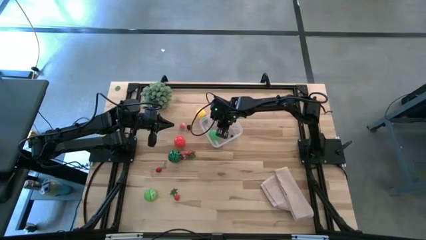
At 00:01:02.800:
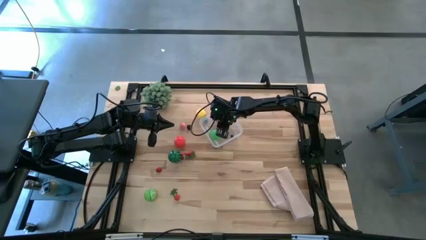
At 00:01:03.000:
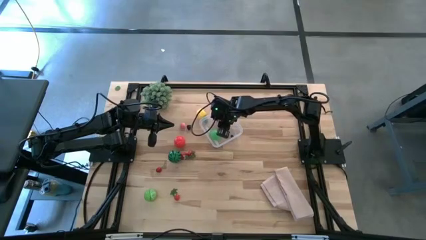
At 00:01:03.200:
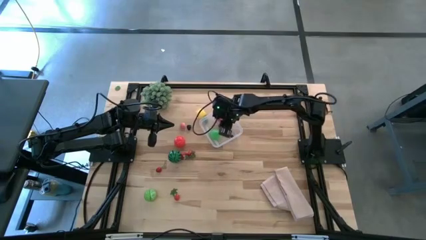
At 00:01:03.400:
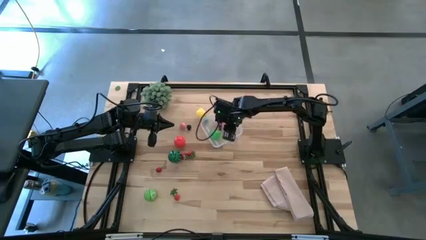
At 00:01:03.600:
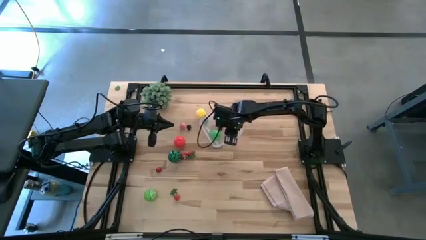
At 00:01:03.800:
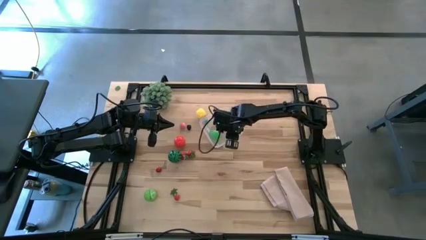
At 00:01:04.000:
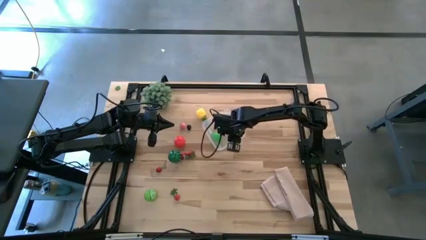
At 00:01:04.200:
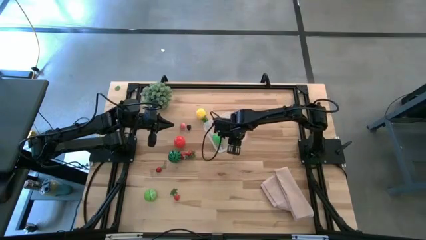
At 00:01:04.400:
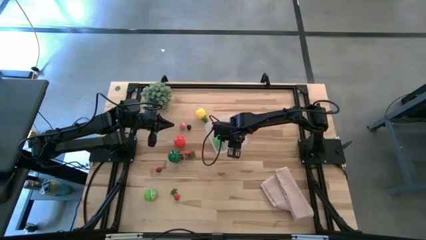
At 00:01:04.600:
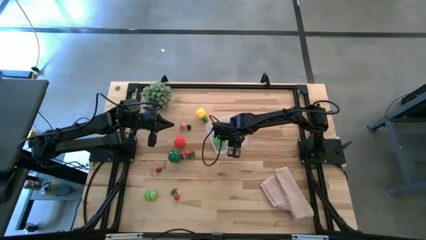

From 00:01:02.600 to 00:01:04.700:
Task: Pick and placing Produce into tupperware
Adjust the transparent bin

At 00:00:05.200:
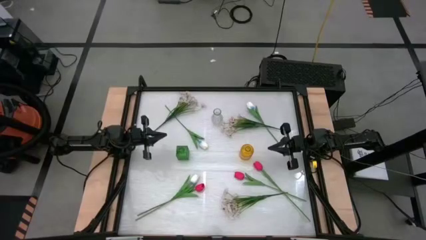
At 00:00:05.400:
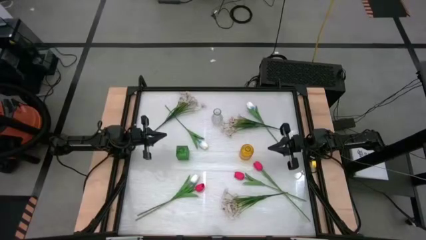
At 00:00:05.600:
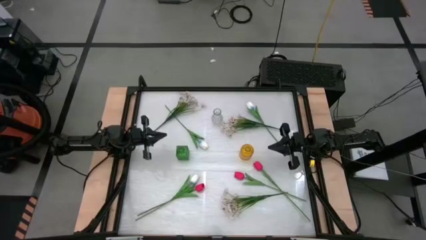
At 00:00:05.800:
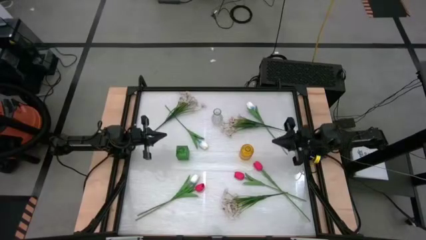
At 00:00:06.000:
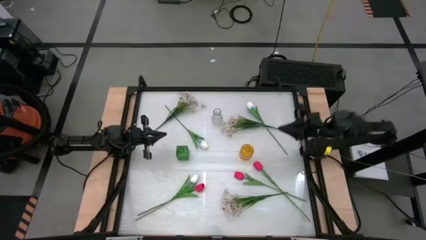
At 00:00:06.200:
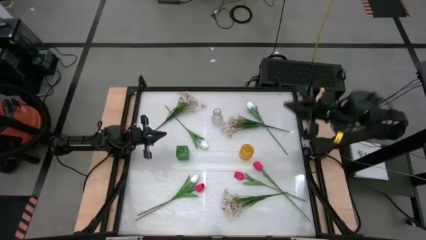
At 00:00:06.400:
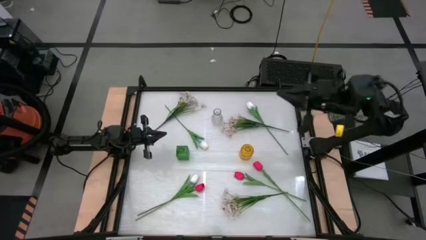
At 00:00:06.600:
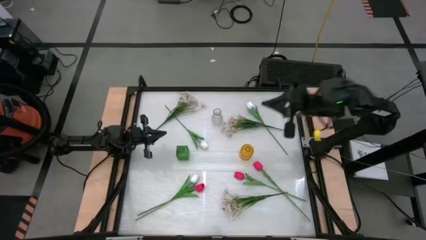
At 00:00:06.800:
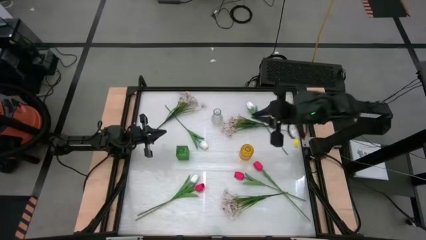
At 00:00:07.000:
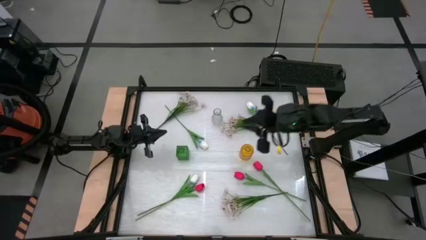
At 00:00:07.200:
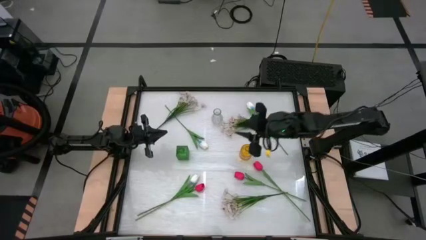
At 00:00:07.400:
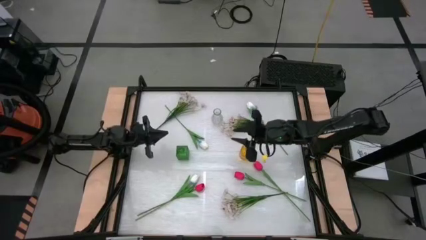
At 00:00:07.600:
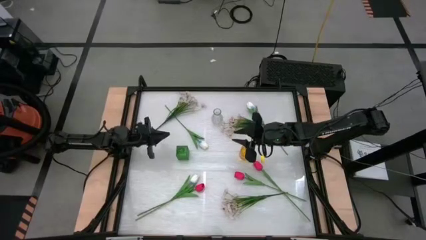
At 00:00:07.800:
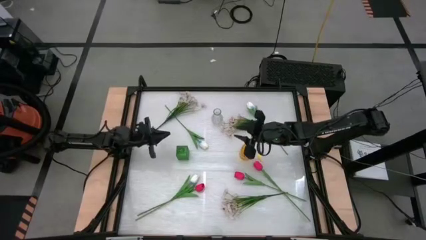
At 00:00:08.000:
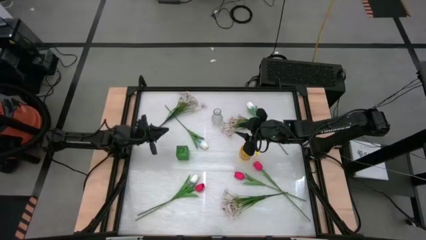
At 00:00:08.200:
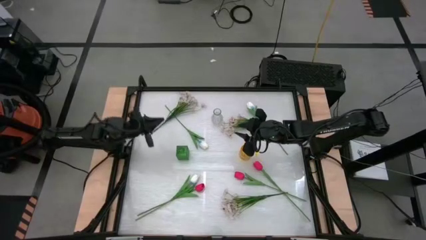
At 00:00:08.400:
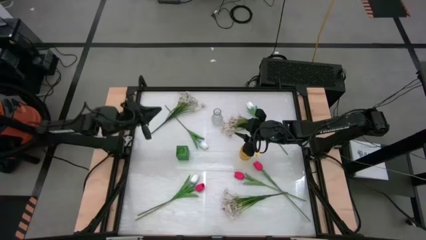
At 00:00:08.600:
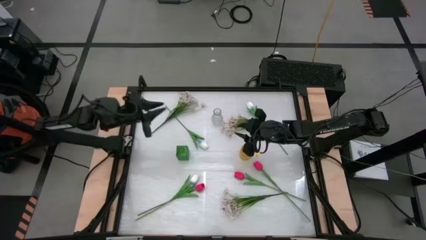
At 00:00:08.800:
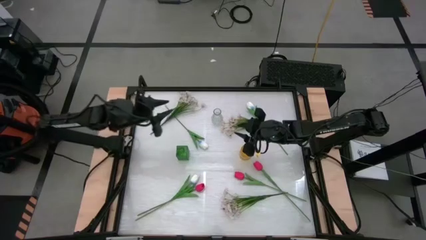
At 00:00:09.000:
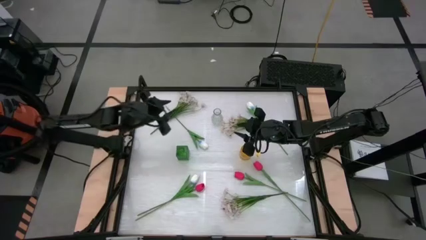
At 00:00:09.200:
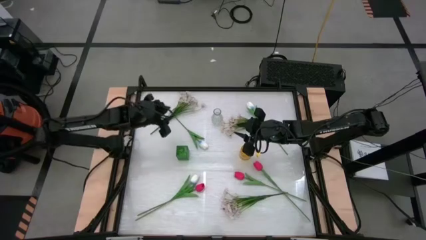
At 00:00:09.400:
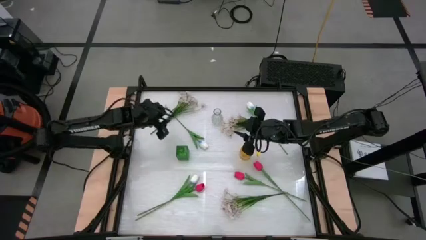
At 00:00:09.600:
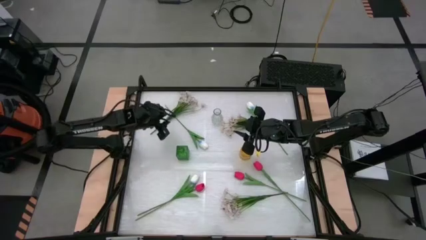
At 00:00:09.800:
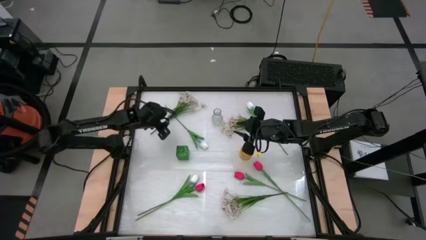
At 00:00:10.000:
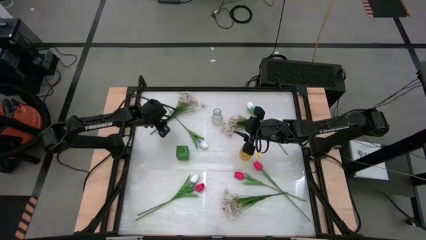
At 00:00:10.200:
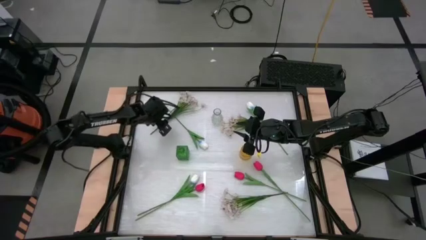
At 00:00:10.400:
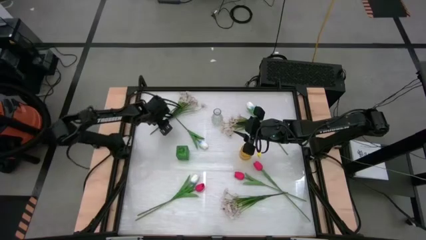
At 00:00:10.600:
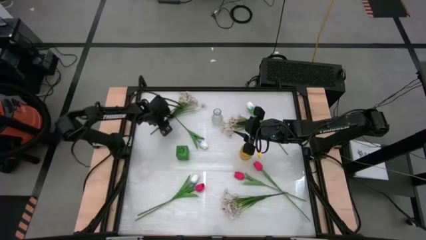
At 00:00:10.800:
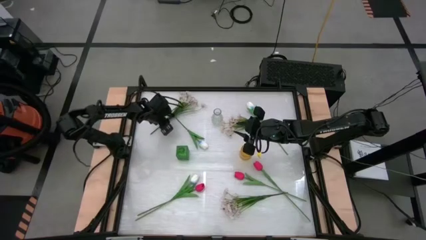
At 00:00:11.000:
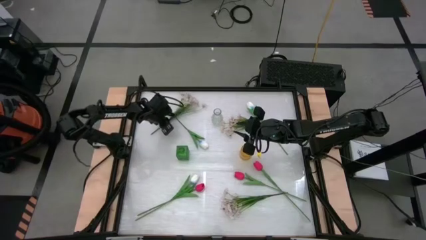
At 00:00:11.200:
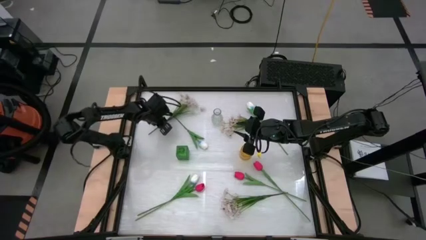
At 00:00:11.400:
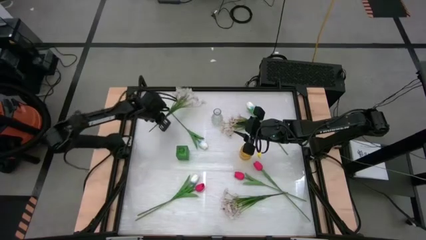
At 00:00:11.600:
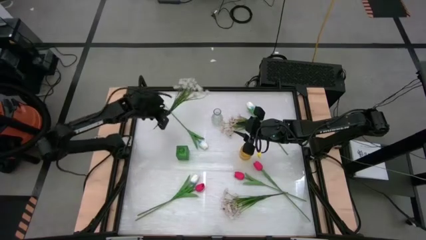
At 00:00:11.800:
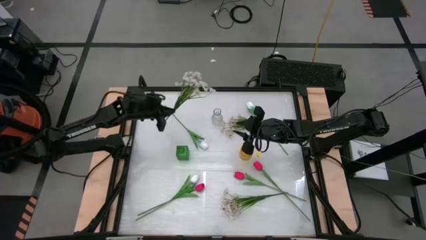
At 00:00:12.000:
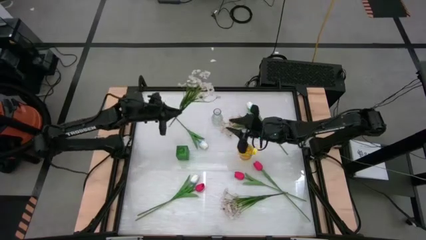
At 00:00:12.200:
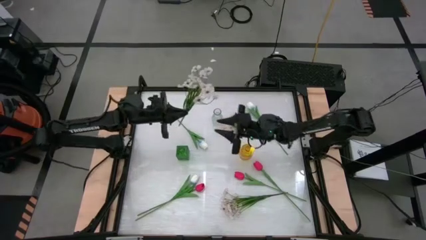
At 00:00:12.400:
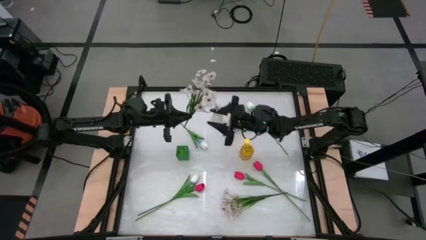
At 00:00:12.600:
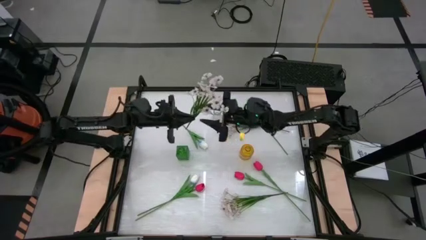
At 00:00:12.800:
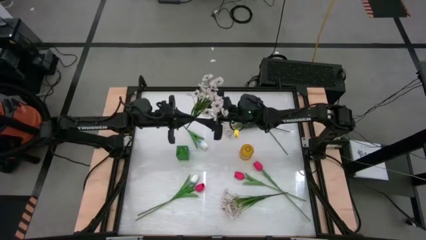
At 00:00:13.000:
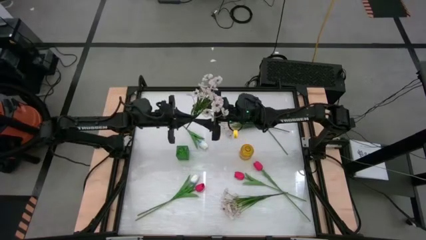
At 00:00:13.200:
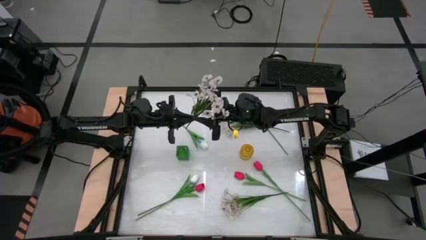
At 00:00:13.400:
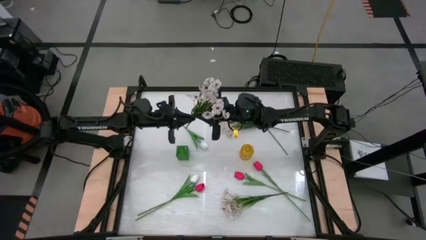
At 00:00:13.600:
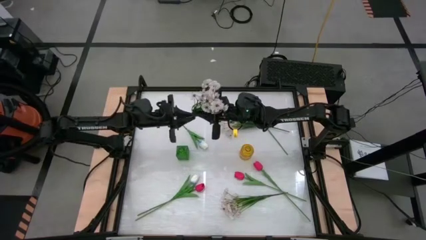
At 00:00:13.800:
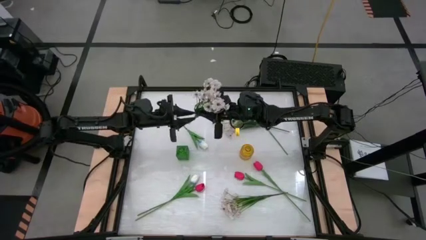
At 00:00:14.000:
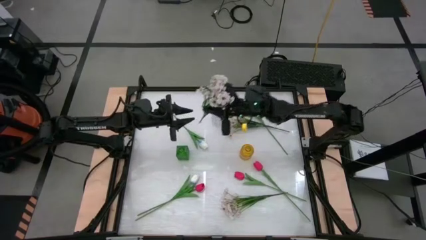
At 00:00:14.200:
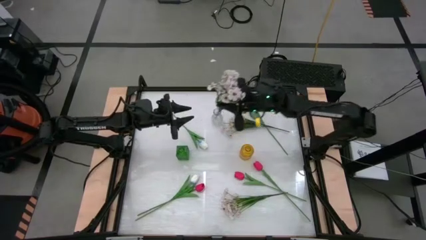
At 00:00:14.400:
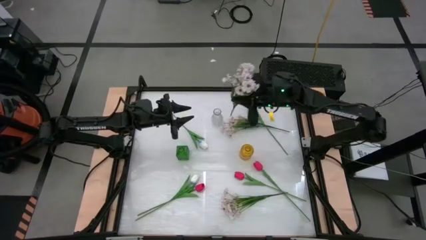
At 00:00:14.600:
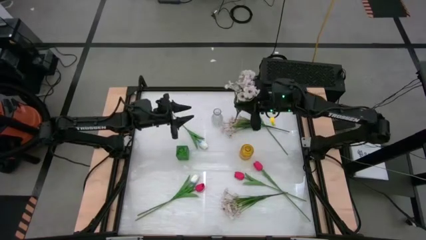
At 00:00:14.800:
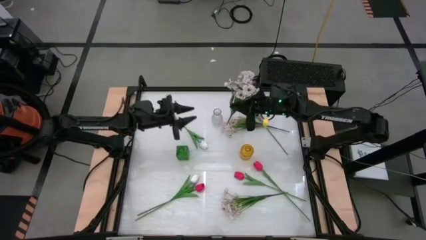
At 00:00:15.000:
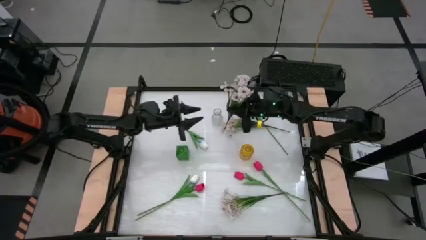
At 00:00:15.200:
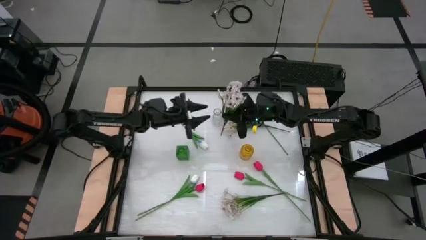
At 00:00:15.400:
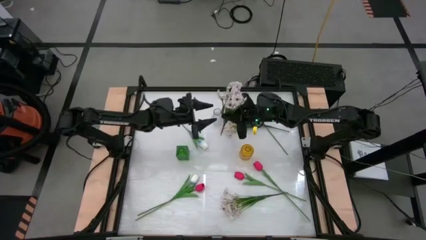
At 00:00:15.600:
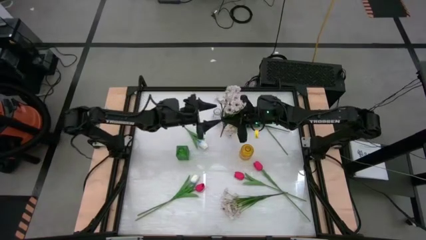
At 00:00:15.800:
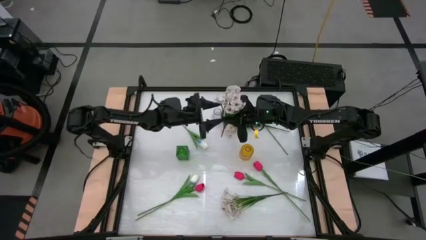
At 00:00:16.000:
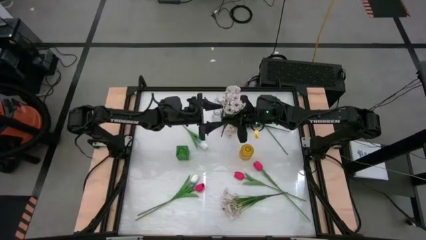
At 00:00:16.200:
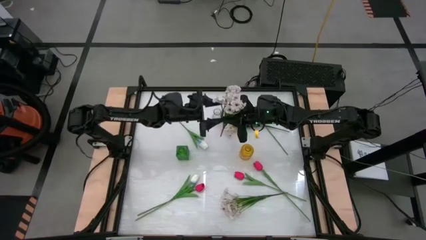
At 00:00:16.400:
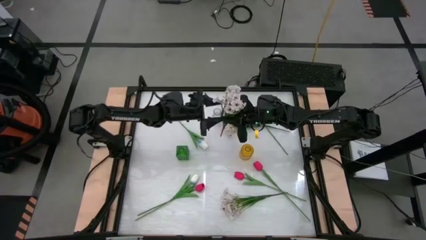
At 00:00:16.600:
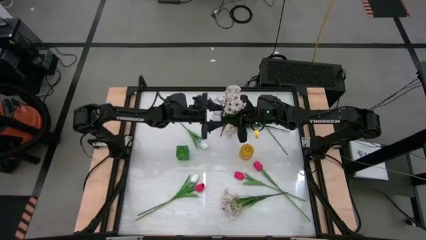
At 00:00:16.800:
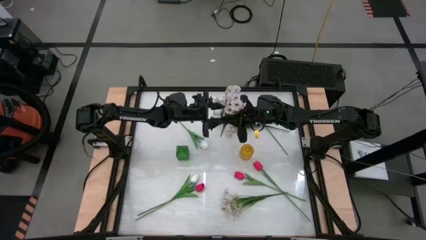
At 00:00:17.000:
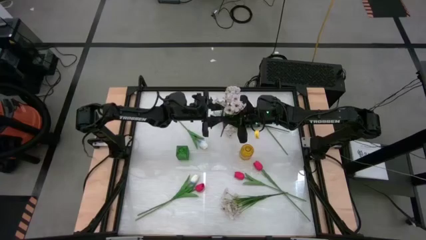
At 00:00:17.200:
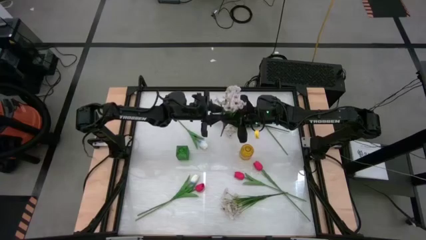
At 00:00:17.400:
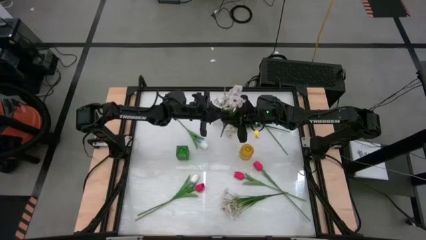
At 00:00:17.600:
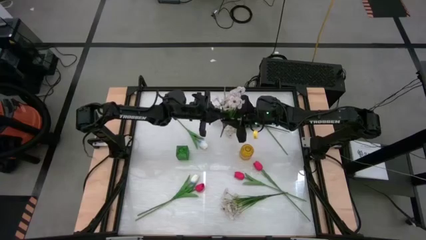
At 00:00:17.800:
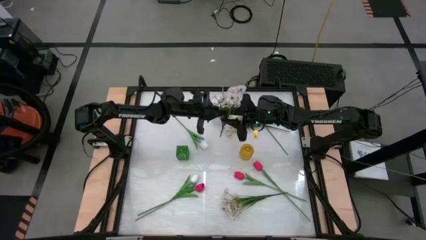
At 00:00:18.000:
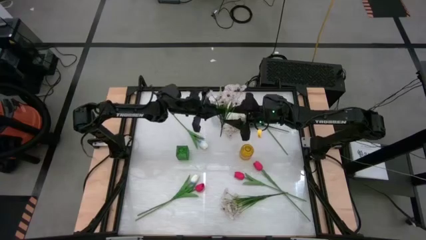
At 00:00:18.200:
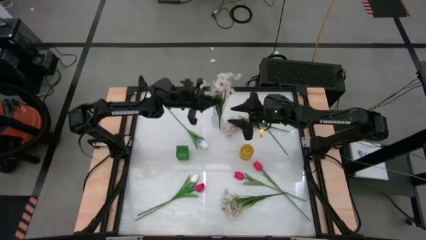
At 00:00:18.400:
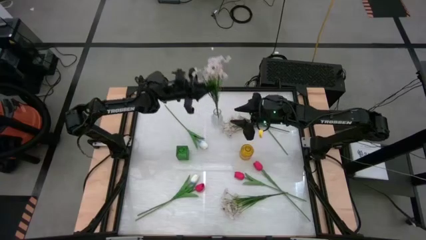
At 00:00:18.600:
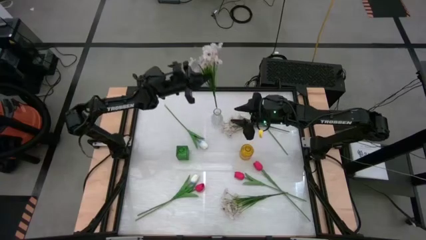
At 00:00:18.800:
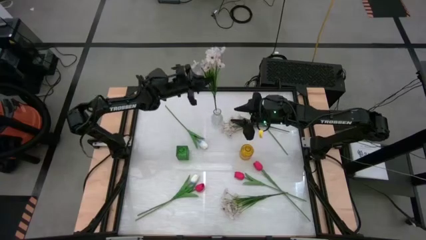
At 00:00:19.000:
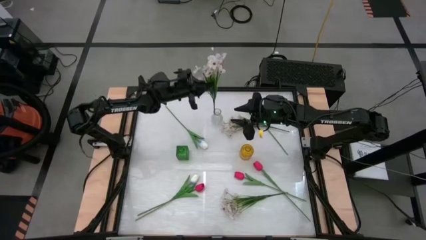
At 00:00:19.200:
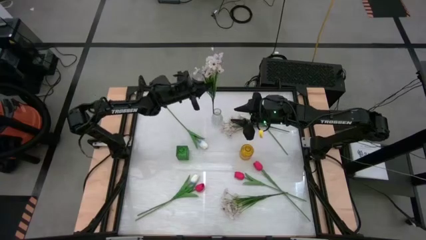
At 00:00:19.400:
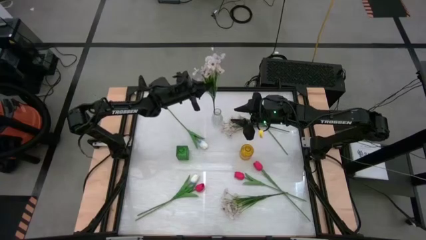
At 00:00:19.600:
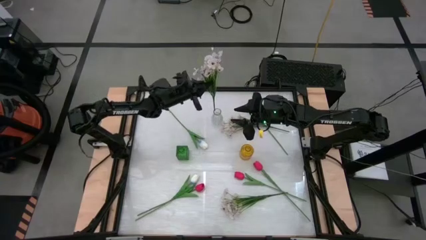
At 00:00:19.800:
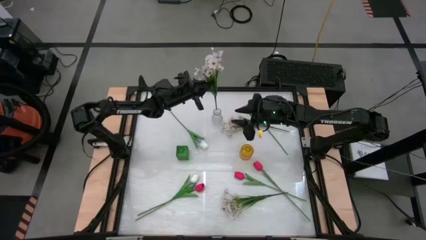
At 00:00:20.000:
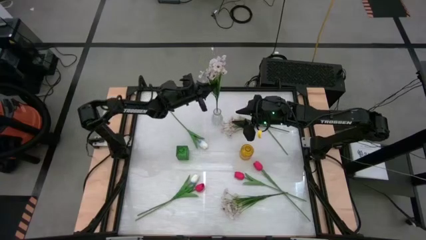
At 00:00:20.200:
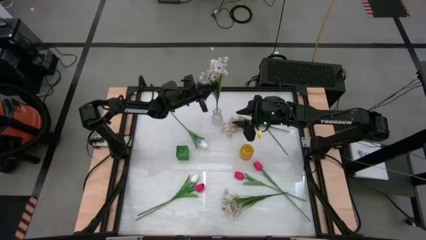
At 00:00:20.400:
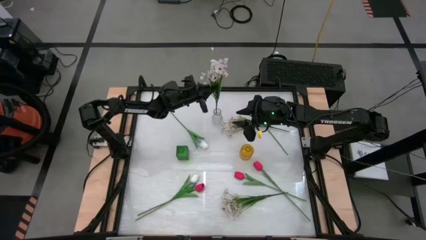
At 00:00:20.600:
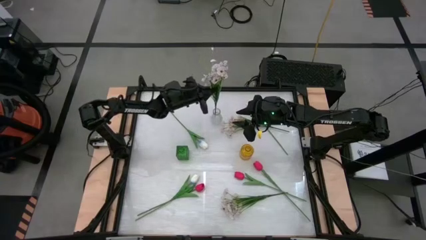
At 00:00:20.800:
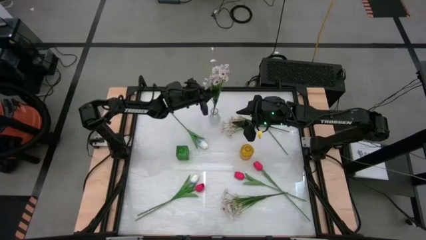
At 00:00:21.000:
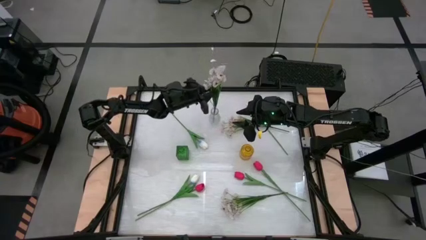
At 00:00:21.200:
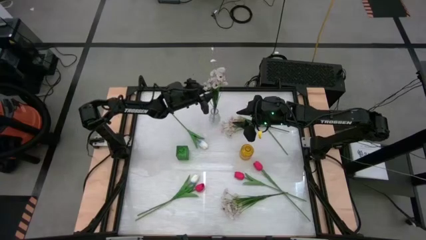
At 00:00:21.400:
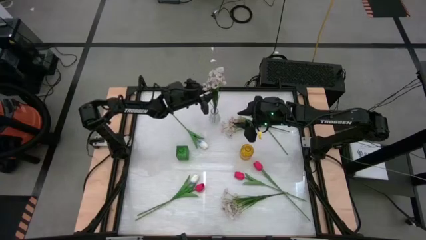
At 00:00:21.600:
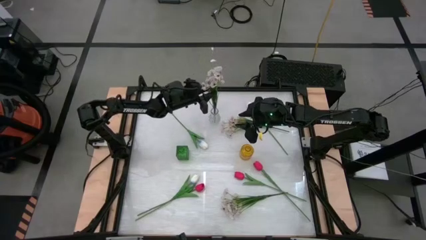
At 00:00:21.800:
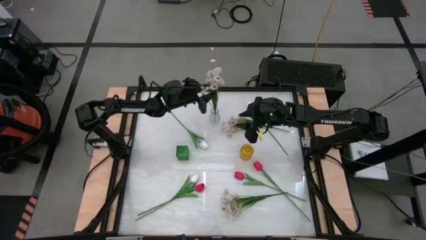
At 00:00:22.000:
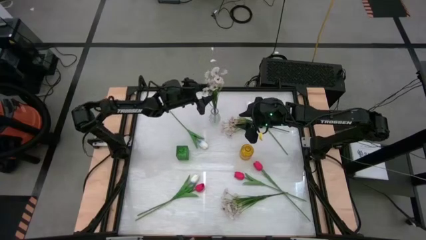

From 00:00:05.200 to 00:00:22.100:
Task: Sort flowers into vase by color
Put the top left white flowers into the transparent vase
